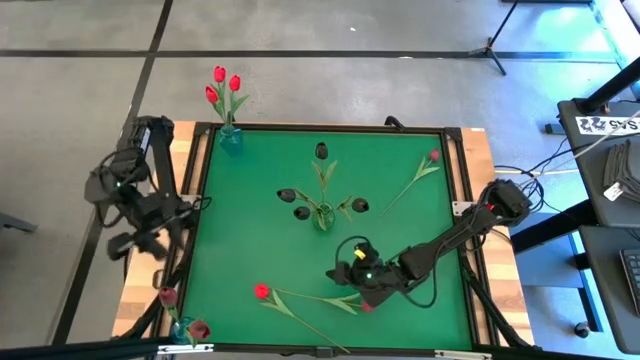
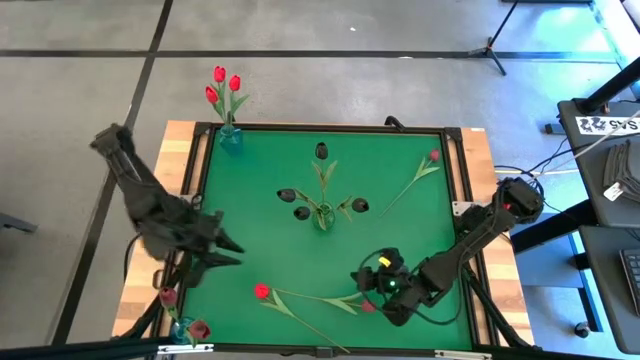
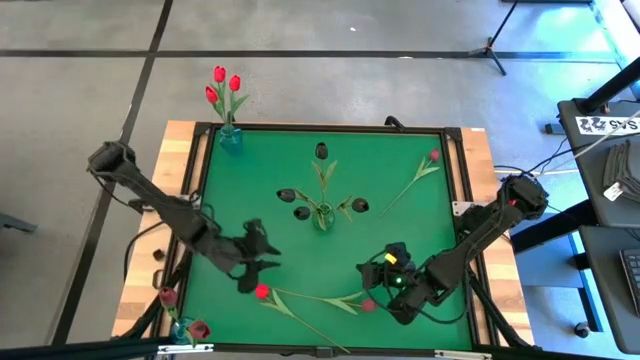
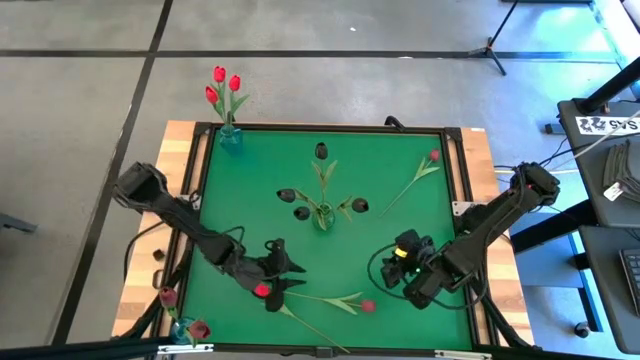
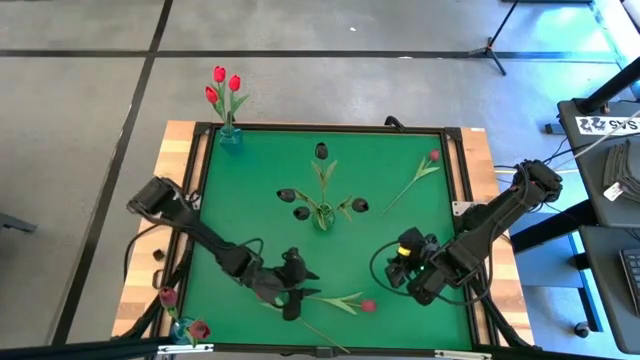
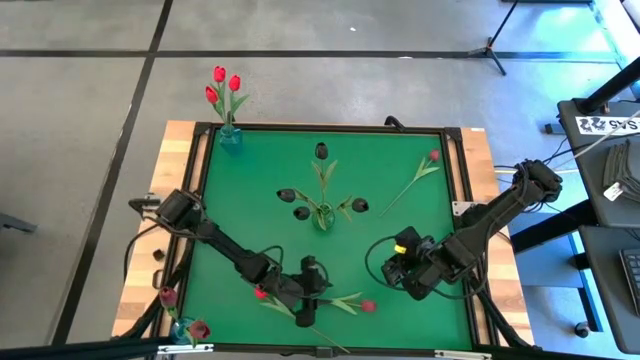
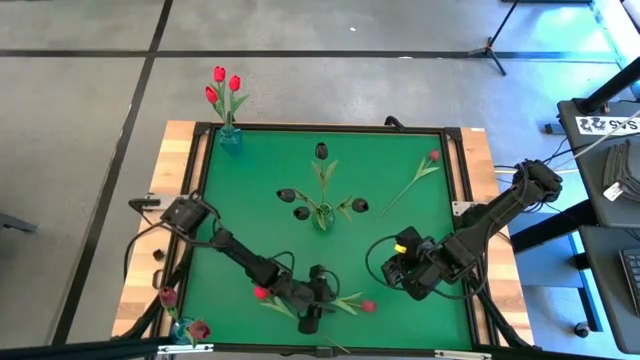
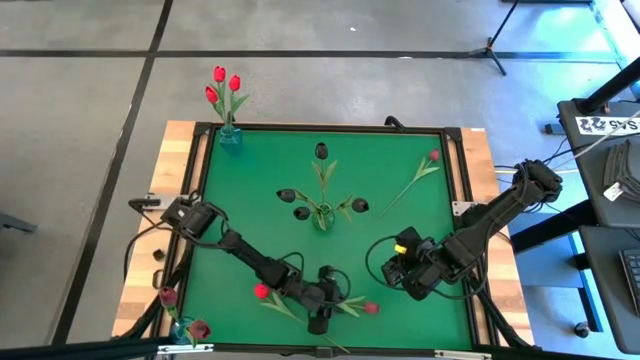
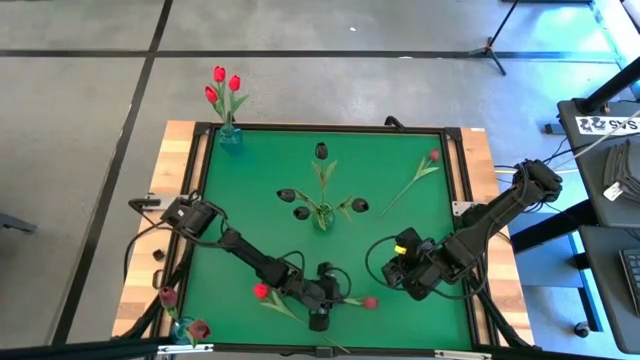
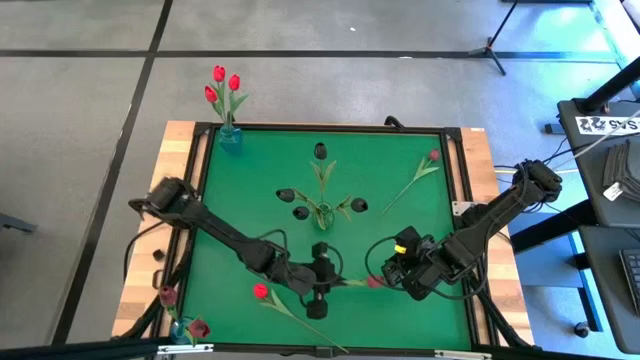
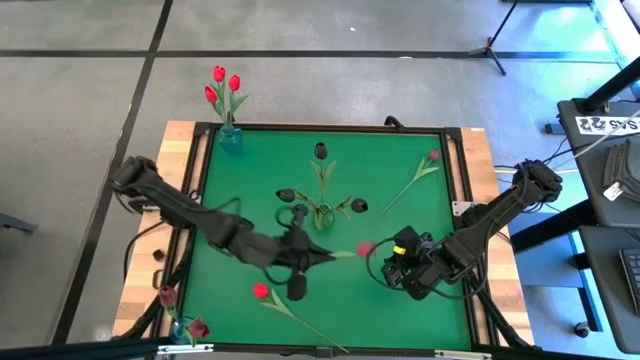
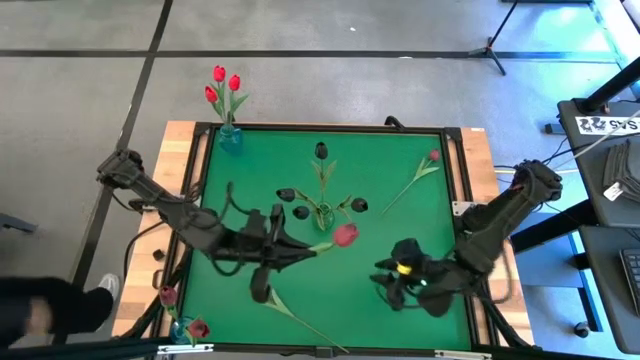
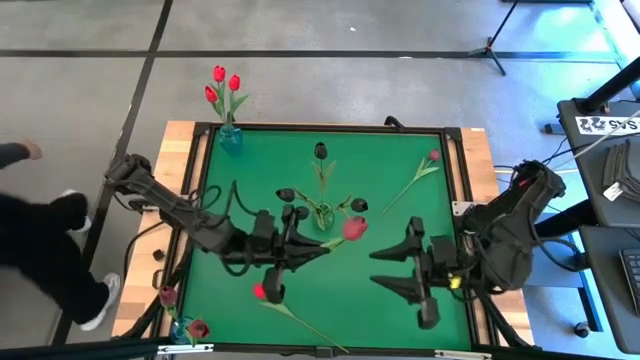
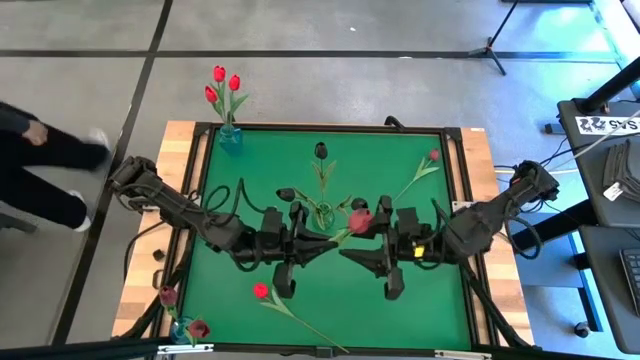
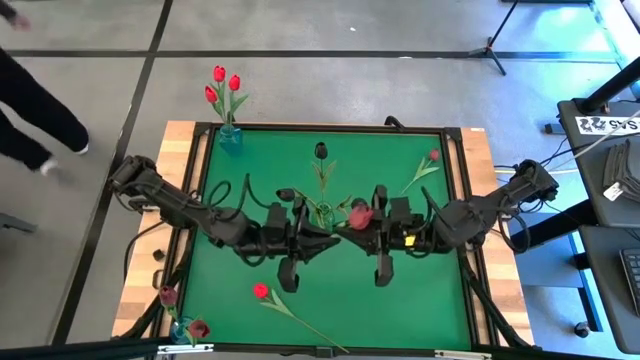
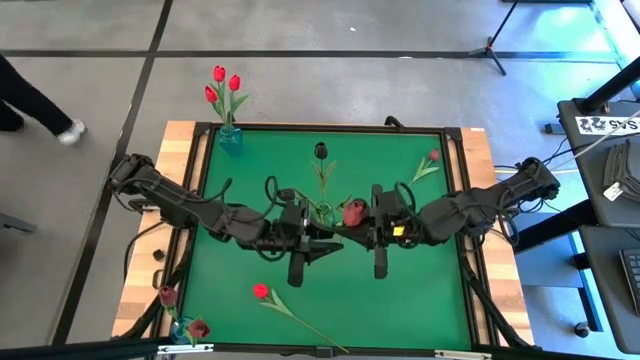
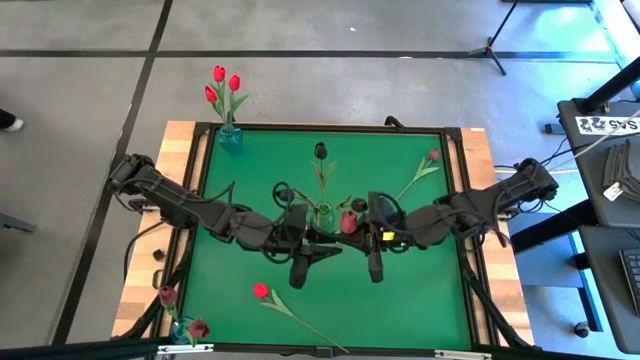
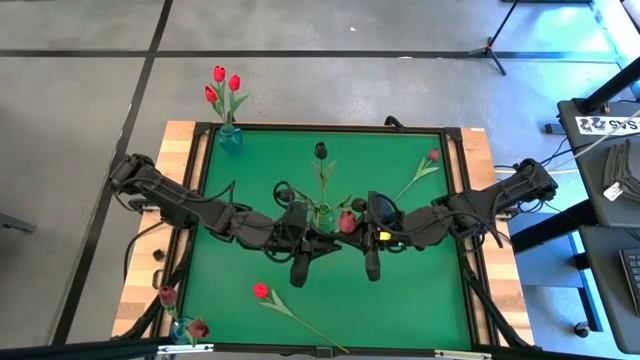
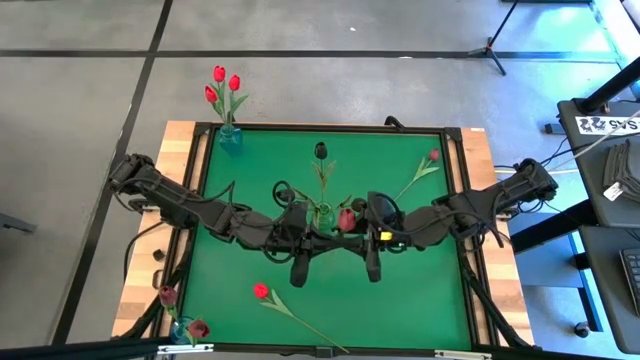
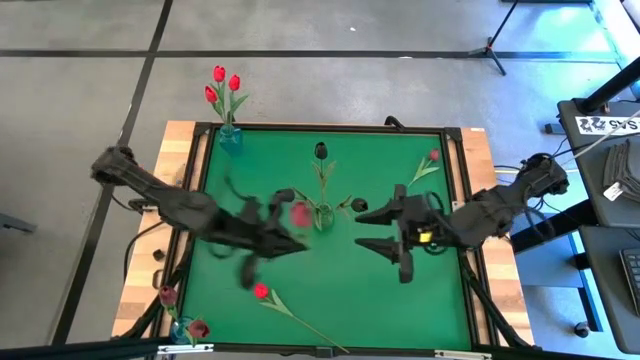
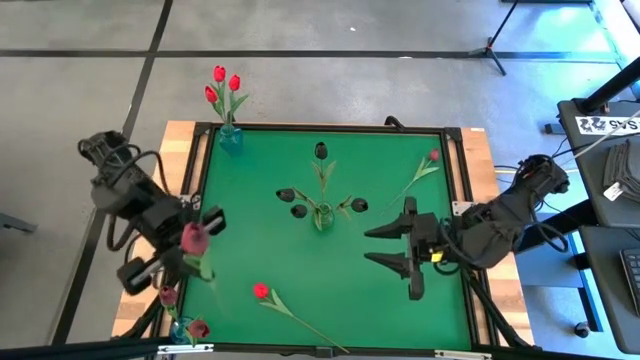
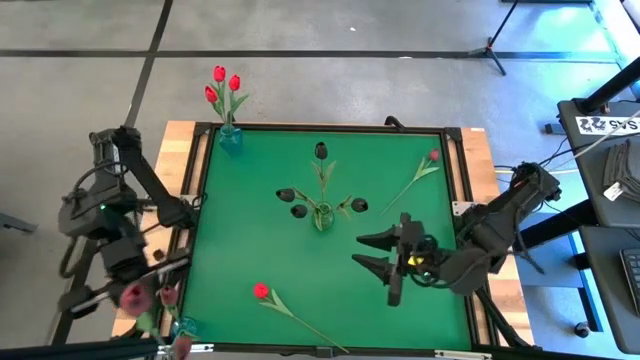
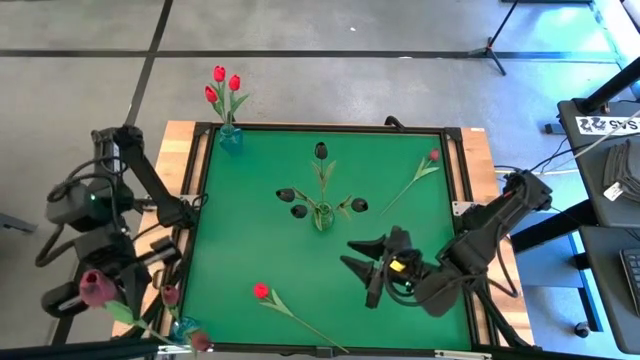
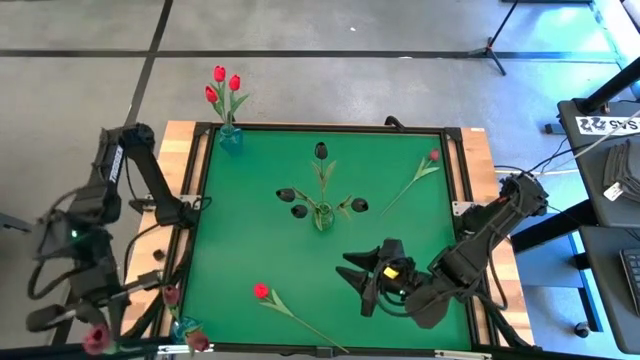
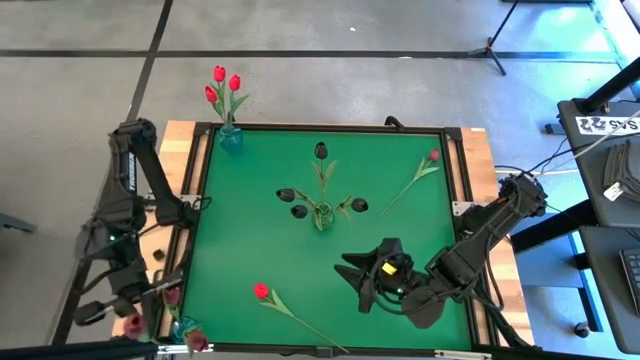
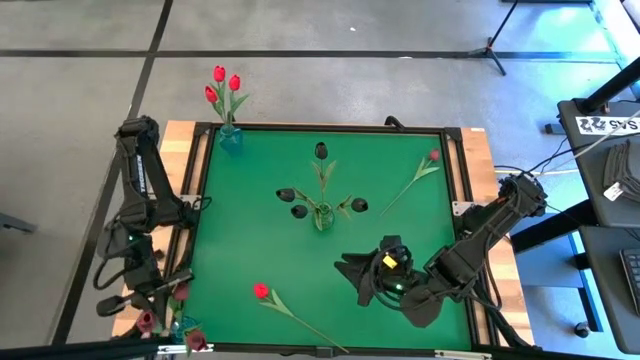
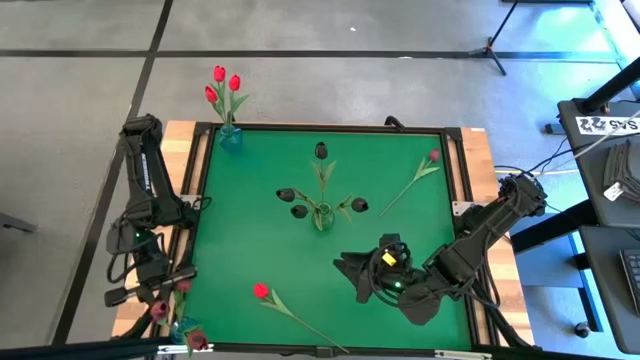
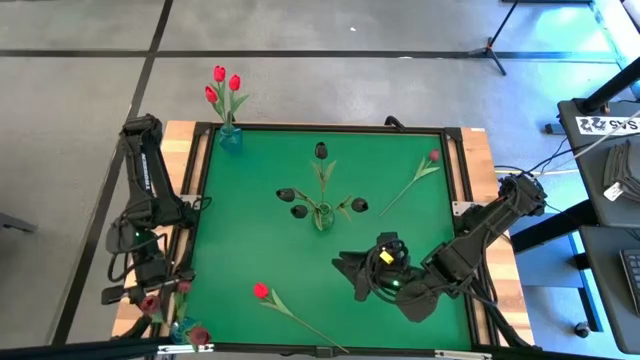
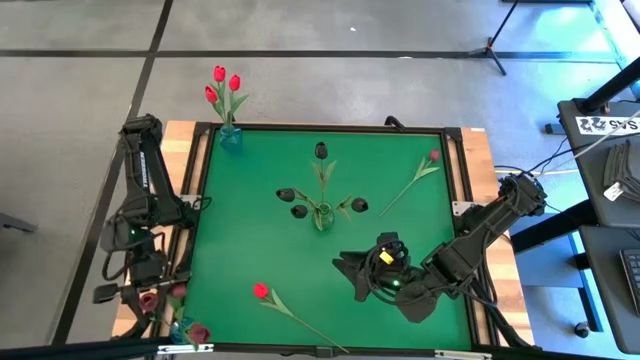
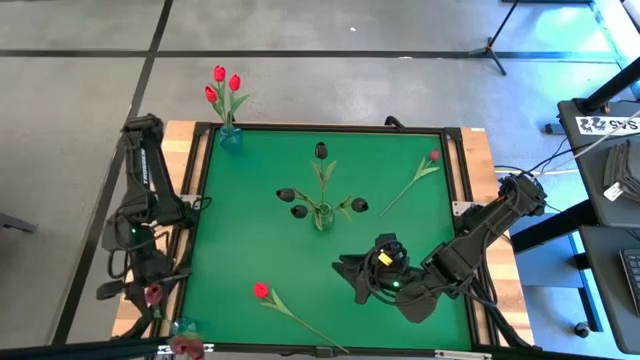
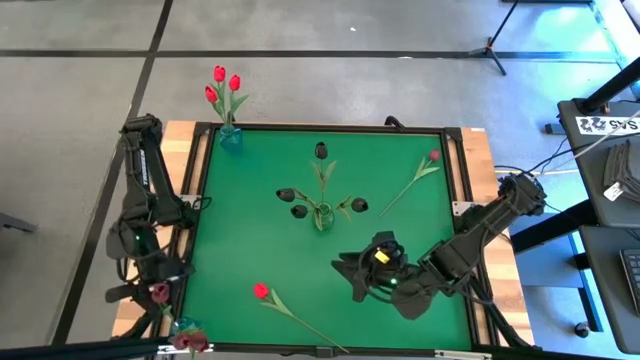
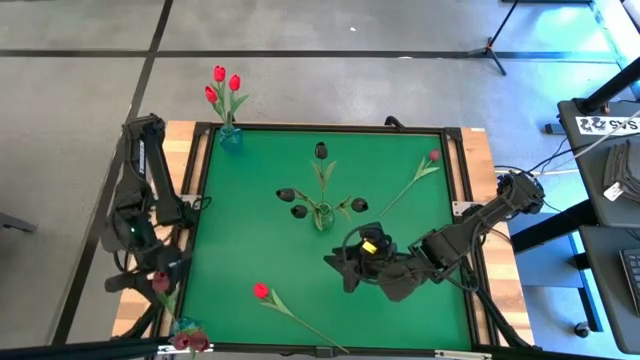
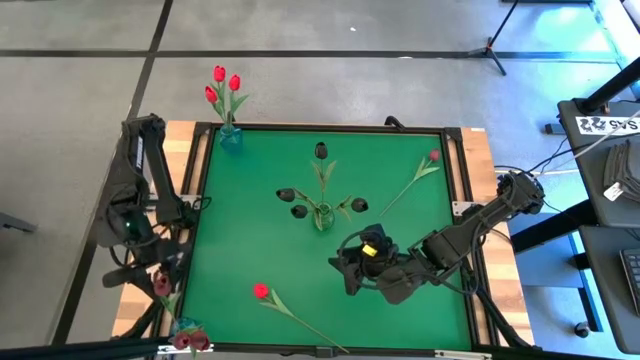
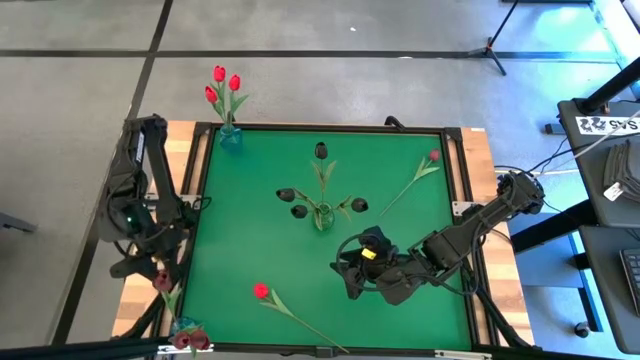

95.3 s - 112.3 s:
Task: Sort flowers into vase by color
Put the dark red tulip into the bottom bottom blue vase

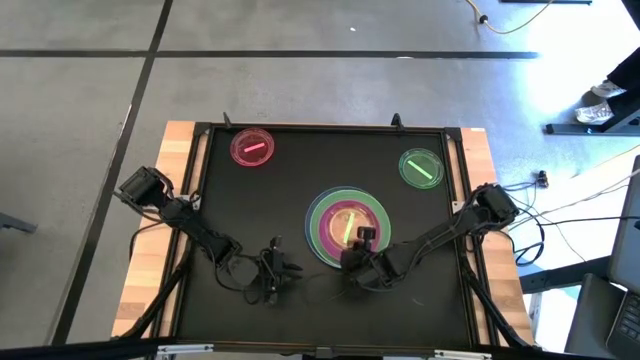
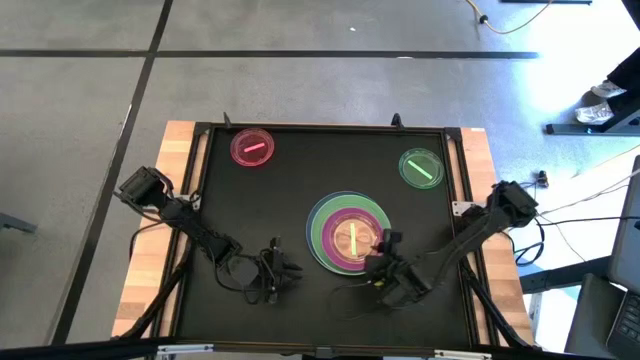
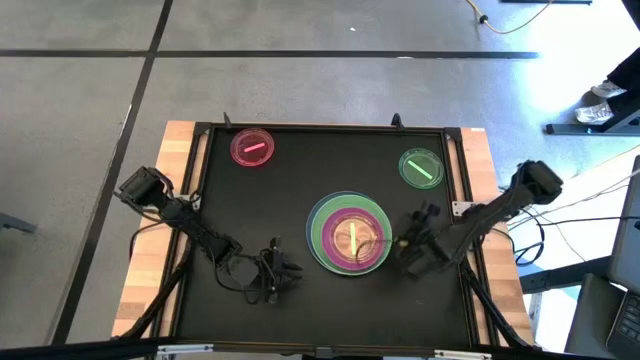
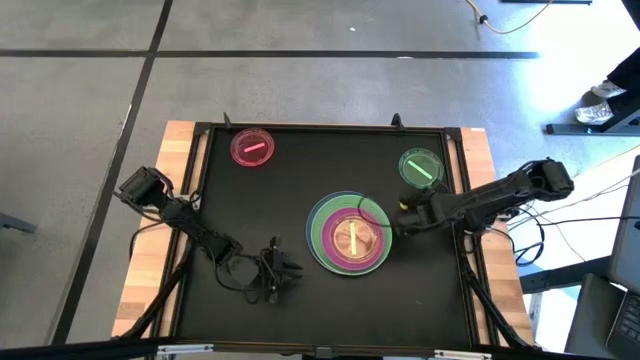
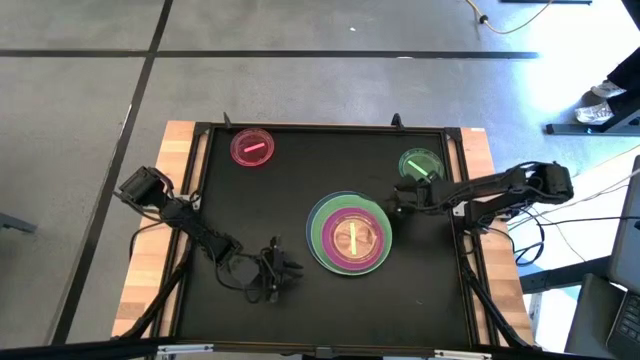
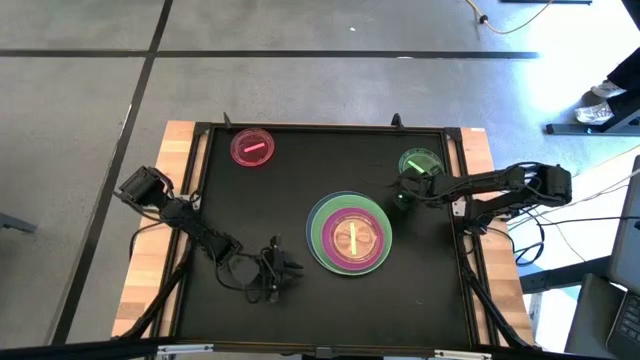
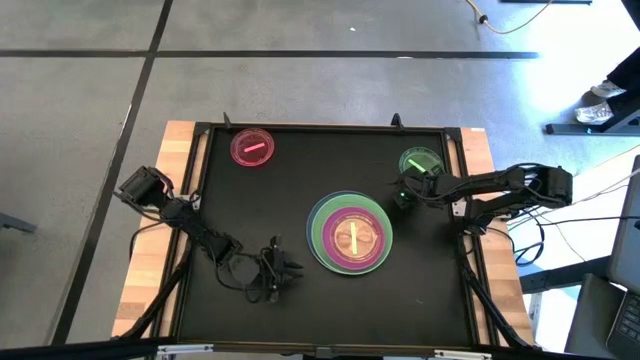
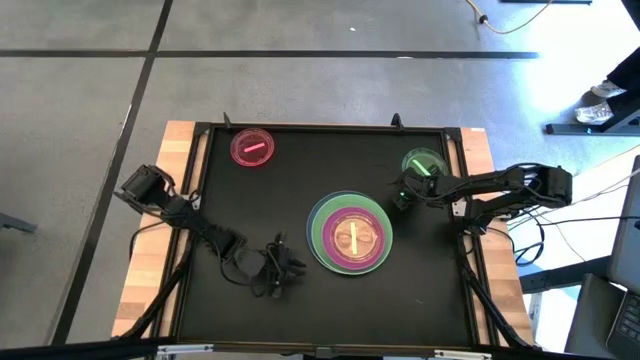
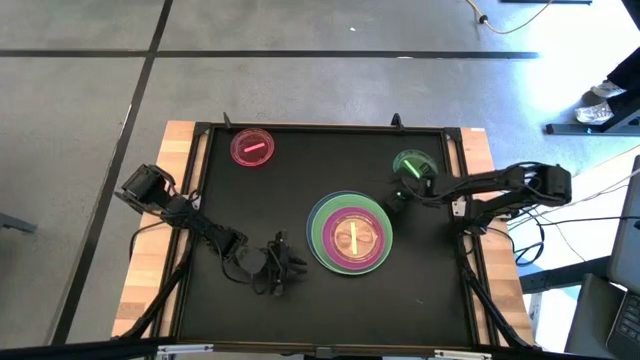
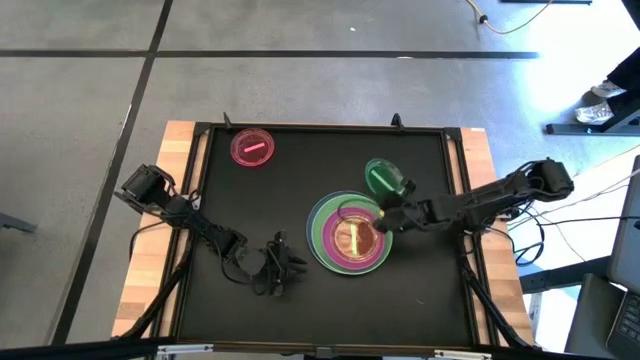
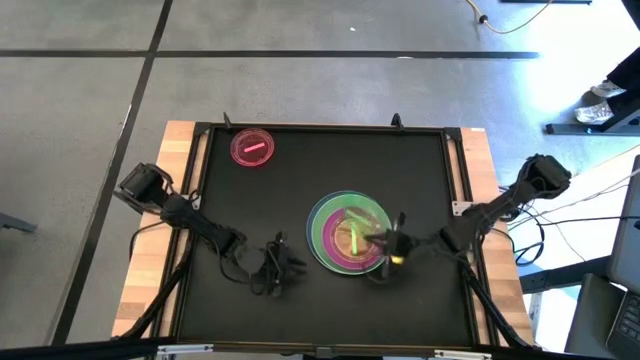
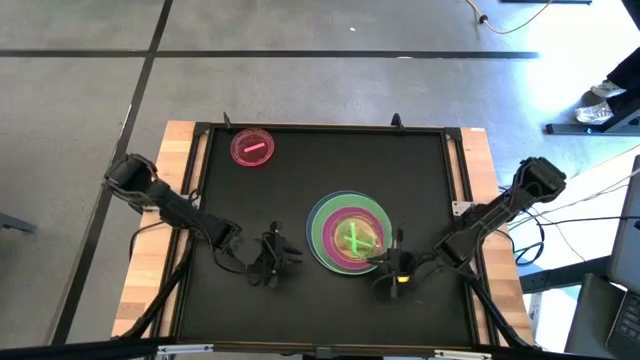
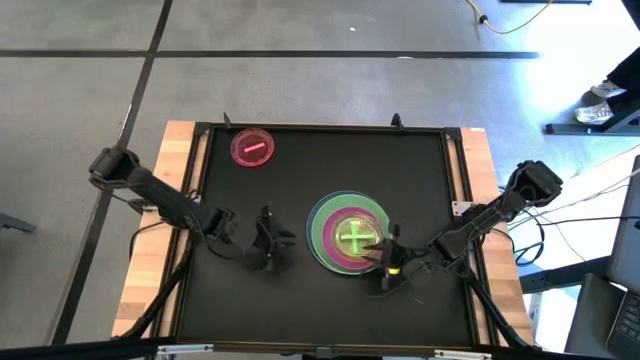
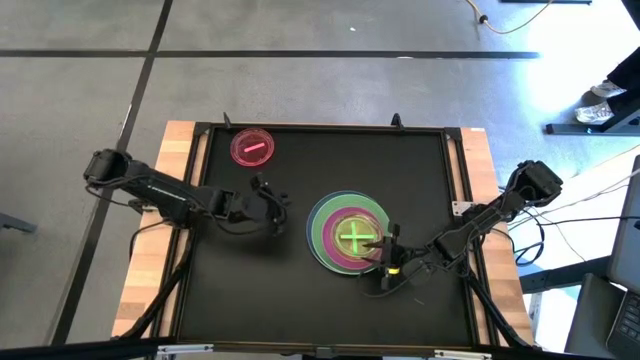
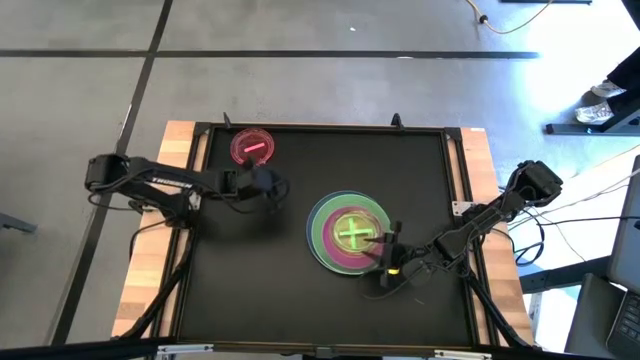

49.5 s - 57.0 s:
Task: Stack plastic plates
Stack the light green plate on top of the light green plate
